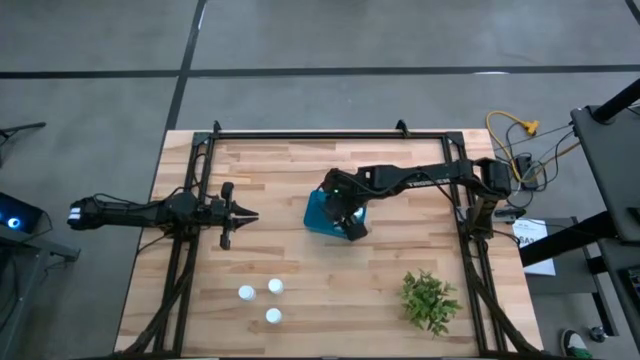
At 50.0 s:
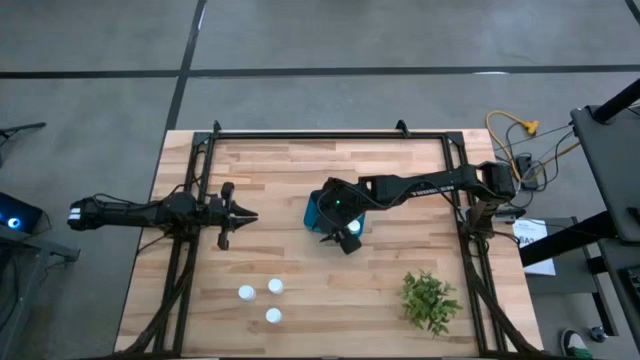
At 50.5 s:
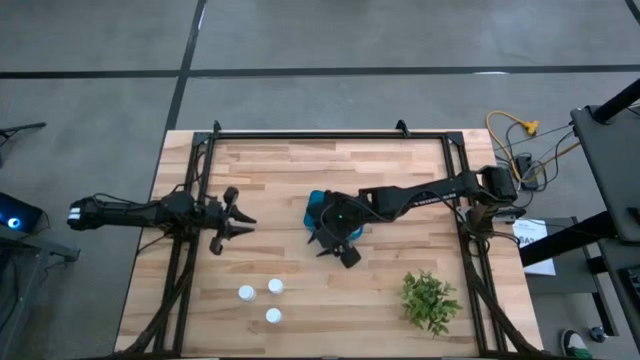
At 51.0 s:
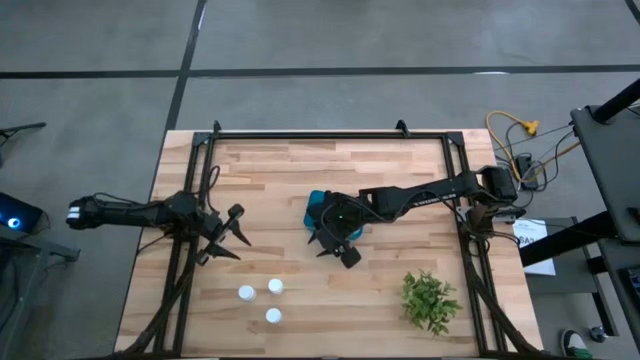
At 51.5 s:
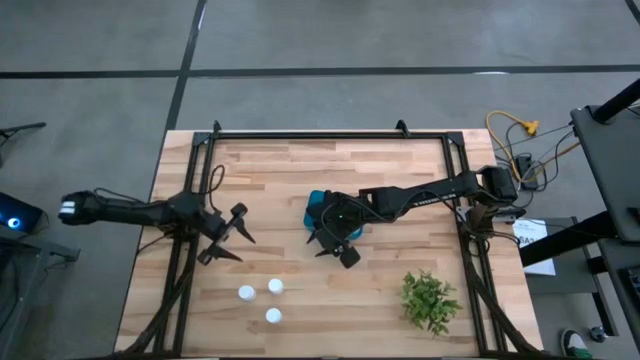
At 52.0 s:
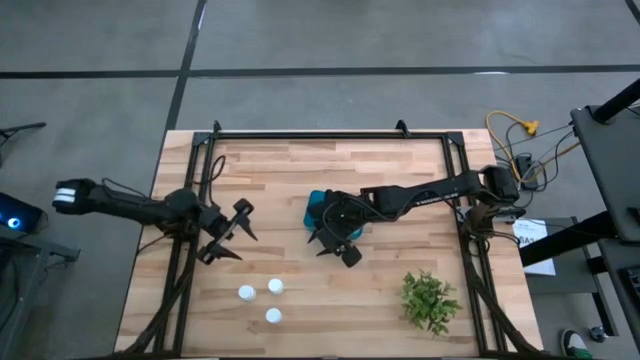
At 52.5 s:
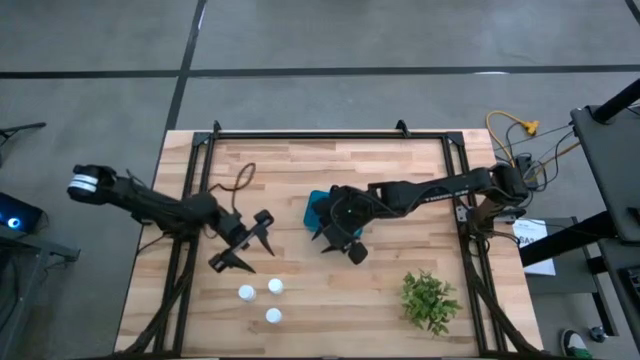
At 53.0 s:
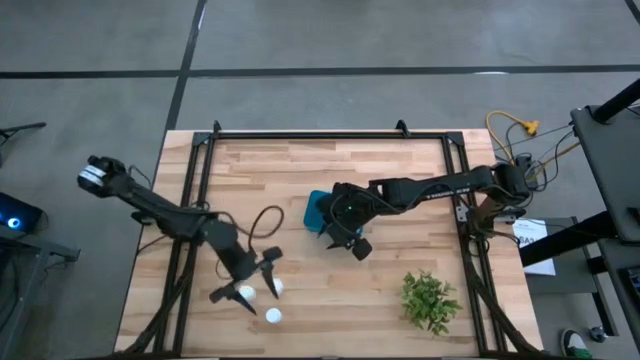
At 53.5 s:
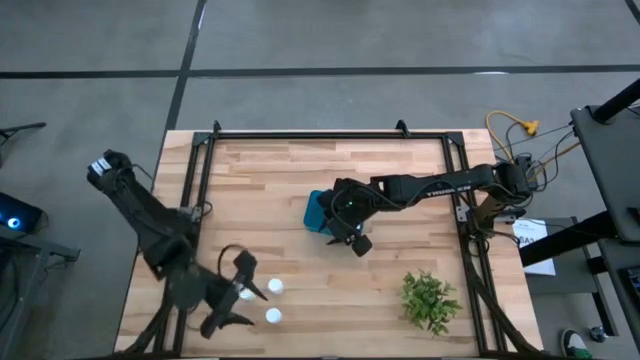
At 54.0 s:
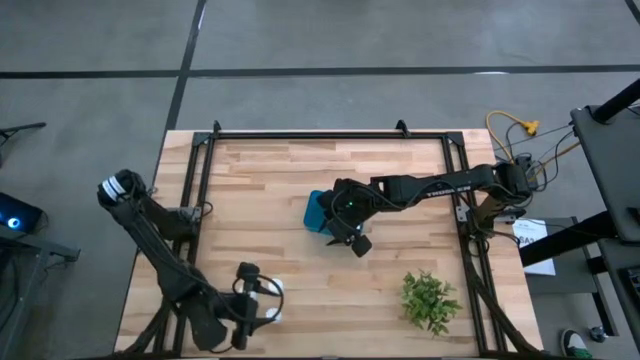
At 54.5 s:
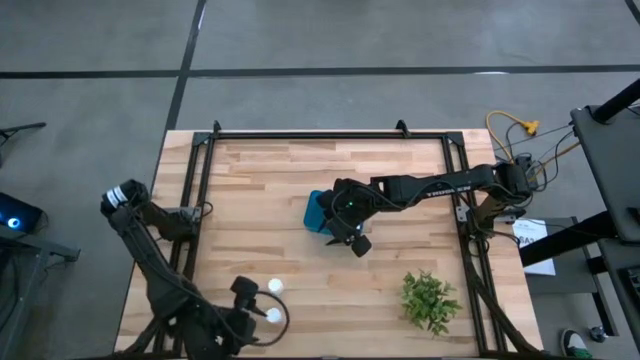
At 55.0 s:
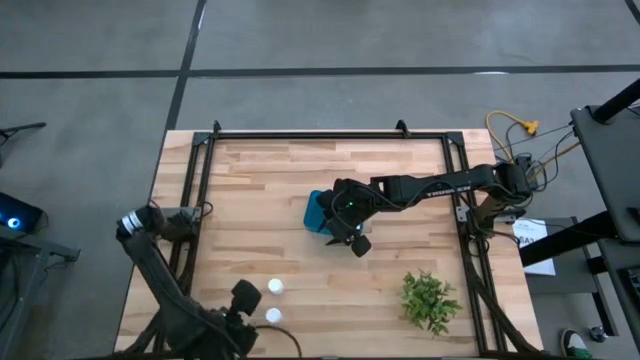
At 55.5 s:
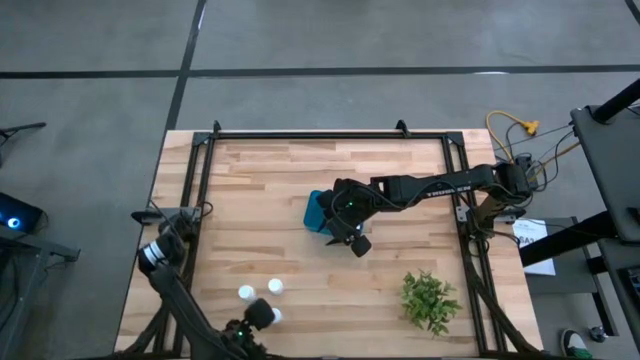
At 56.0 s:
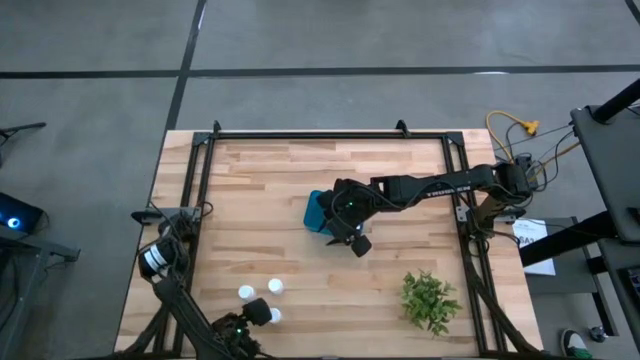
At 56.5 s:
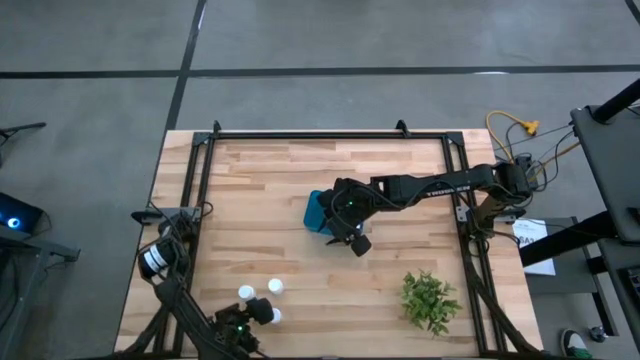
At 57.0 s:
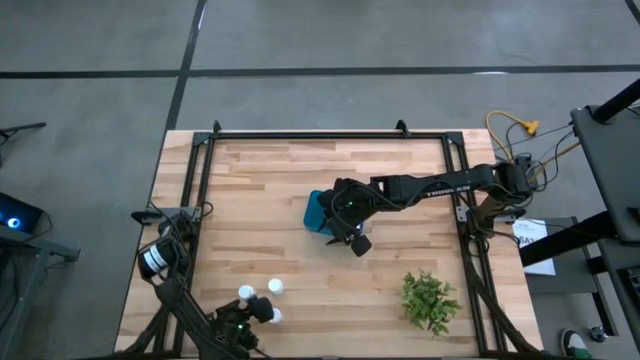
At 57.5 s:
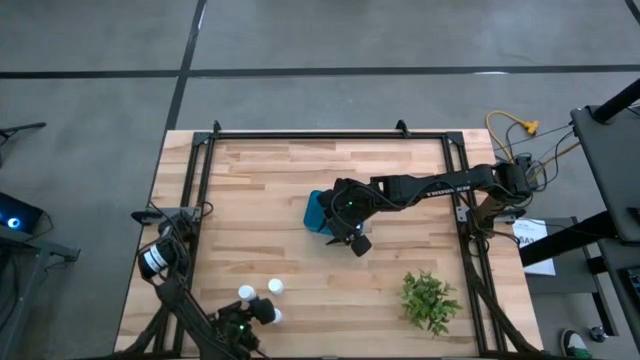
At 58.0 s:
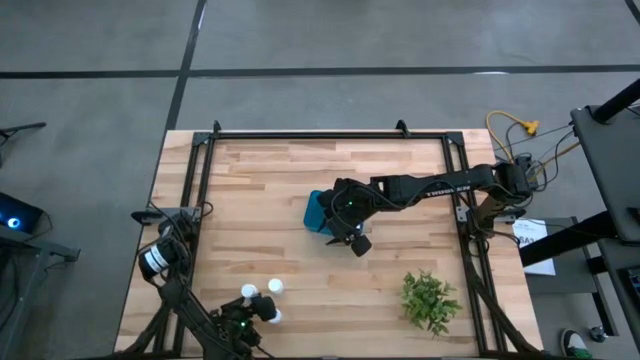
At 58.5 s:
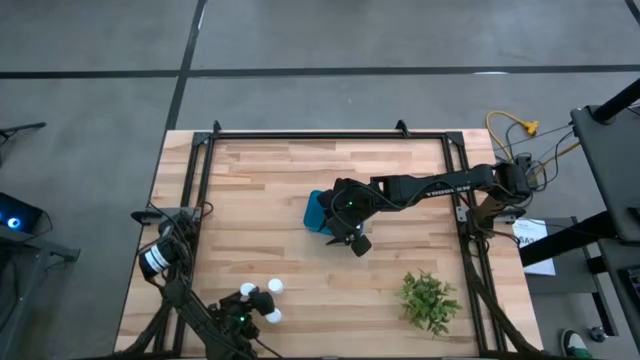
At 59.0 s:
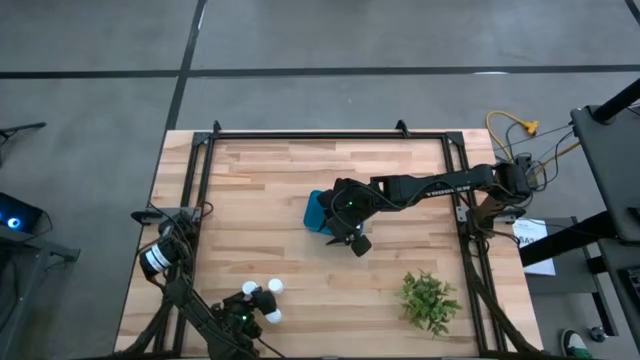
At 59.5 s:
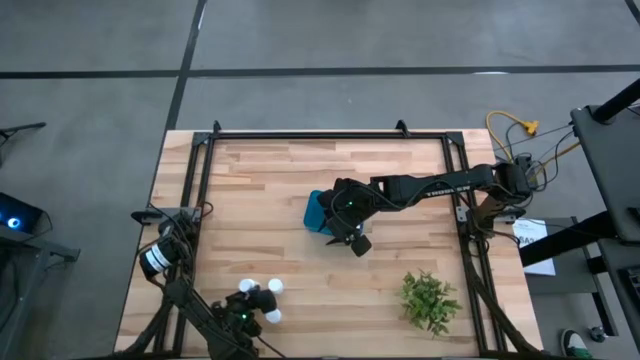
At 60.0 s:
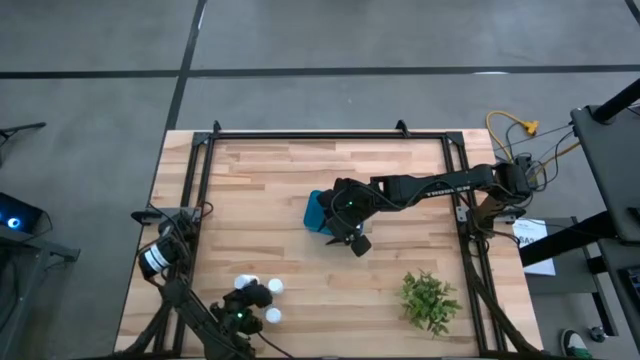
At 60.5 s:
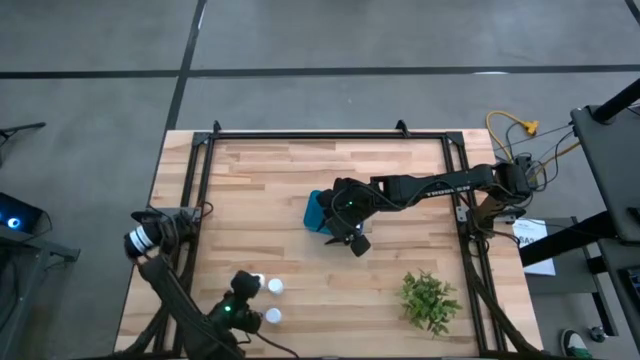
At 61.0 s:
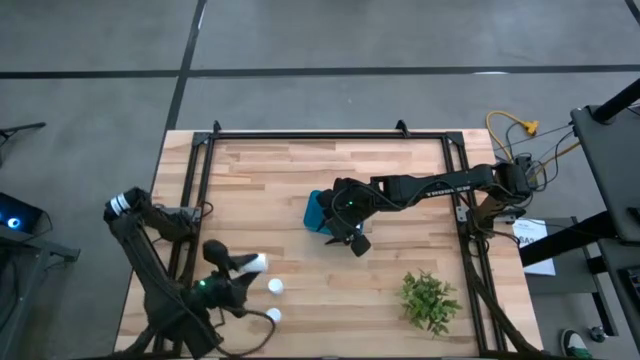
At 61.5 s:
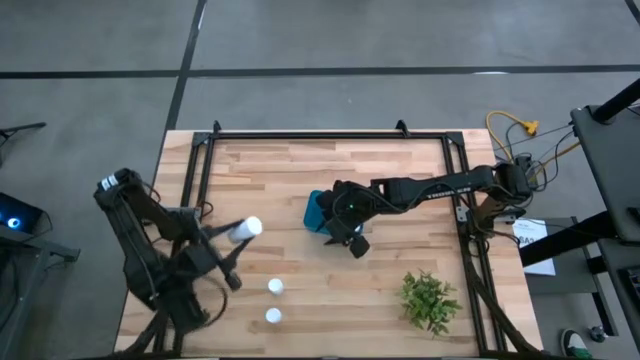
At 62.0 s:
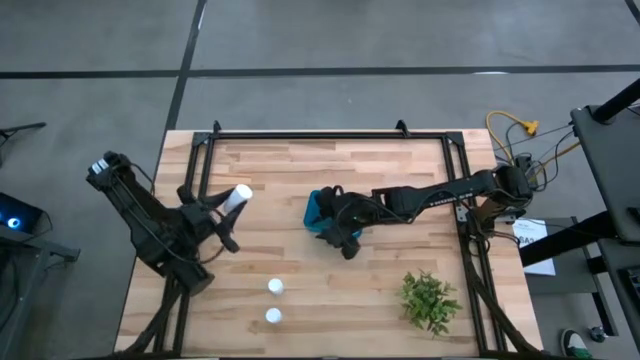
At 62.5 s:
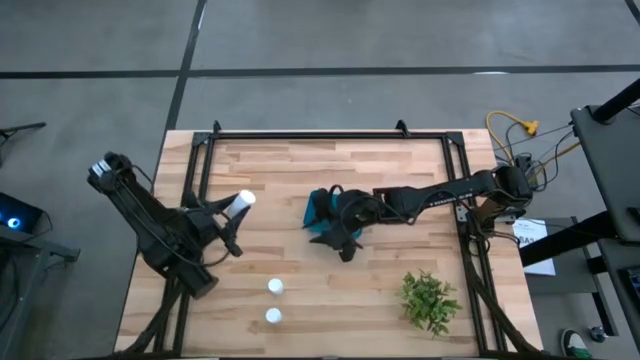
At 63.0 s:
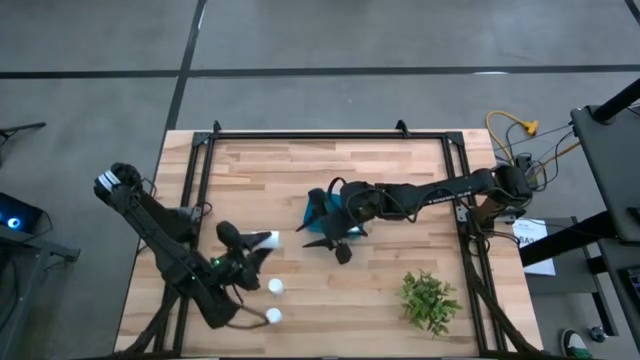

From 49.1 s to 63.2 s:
Task: Pick and place pill bottles into a basket
Put the white pill bottle into the blue bin
